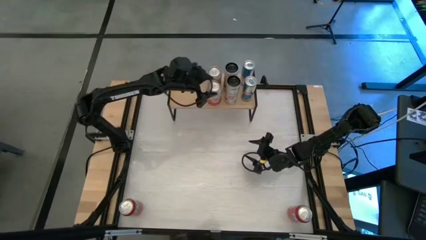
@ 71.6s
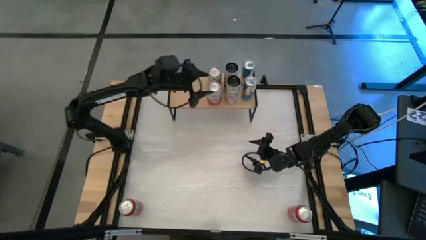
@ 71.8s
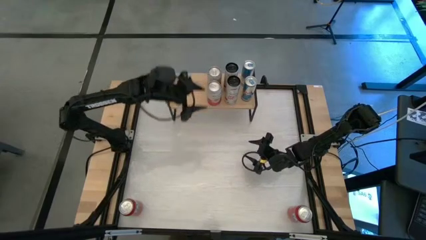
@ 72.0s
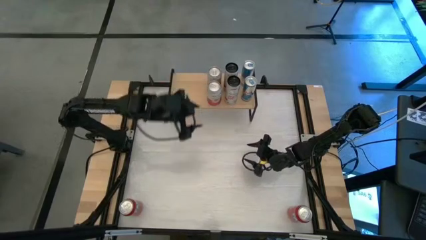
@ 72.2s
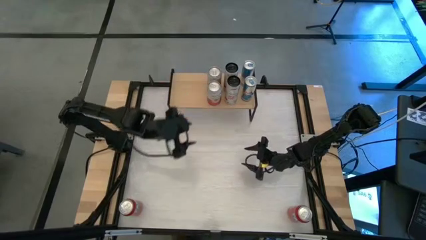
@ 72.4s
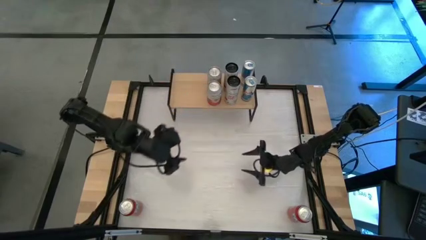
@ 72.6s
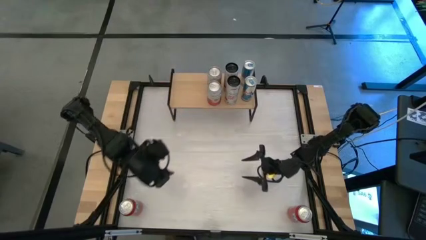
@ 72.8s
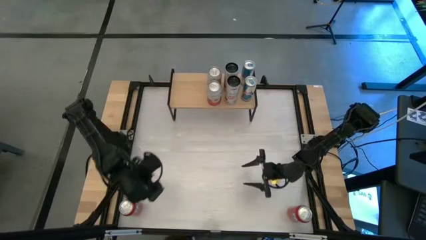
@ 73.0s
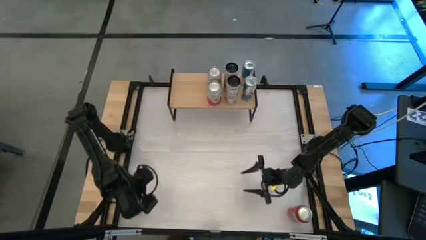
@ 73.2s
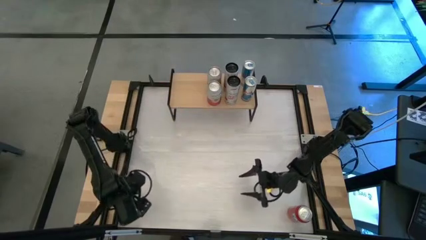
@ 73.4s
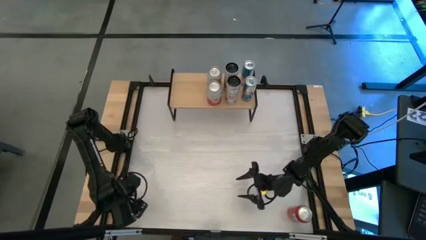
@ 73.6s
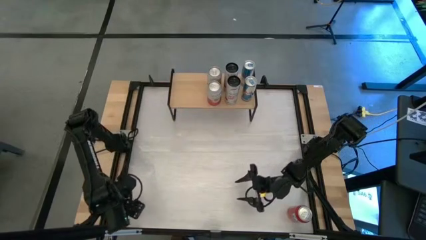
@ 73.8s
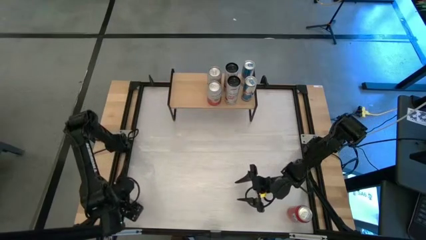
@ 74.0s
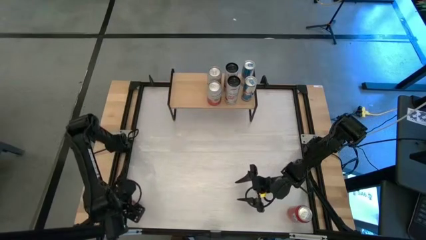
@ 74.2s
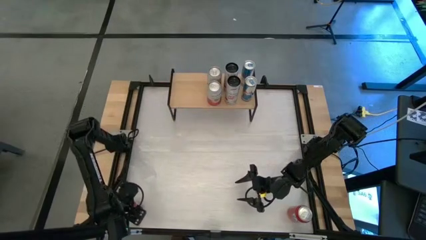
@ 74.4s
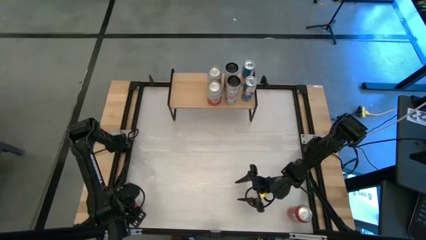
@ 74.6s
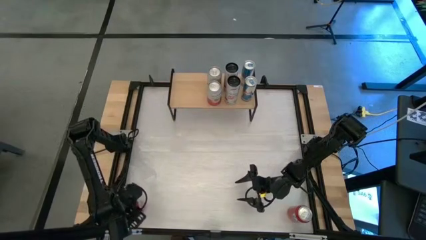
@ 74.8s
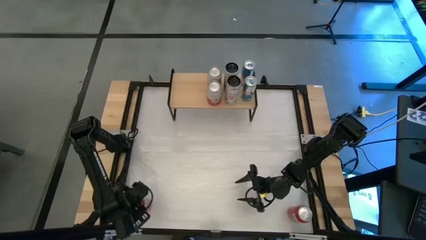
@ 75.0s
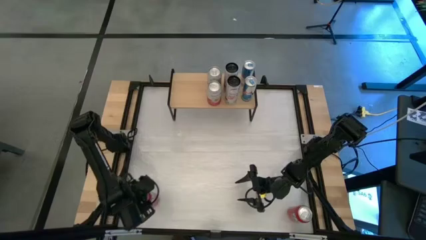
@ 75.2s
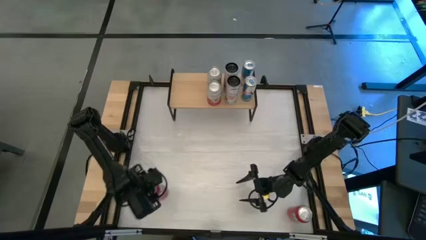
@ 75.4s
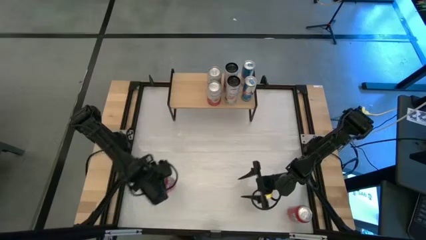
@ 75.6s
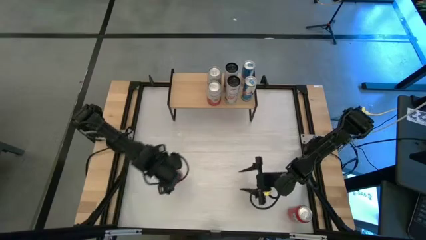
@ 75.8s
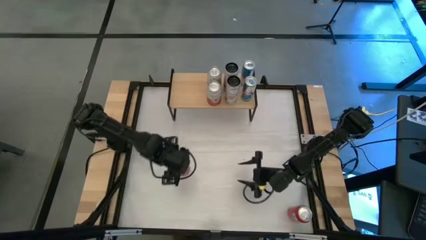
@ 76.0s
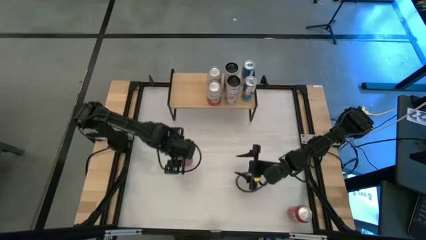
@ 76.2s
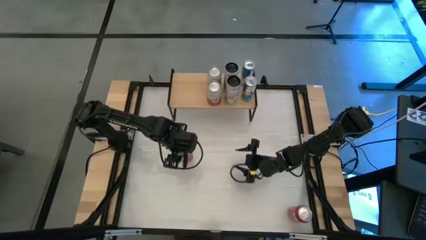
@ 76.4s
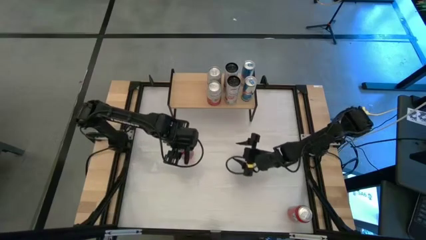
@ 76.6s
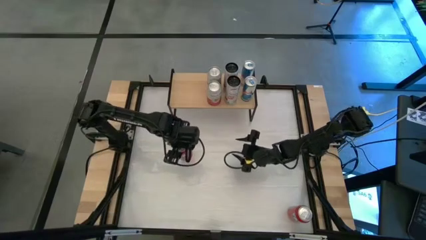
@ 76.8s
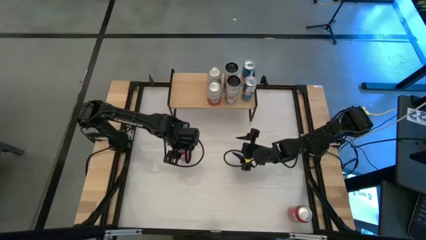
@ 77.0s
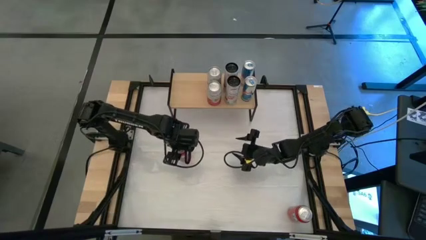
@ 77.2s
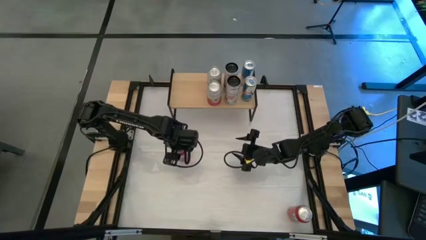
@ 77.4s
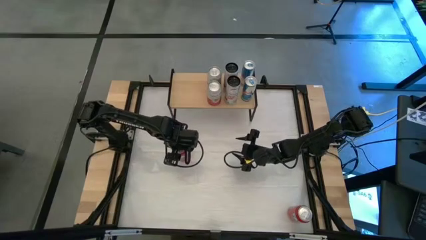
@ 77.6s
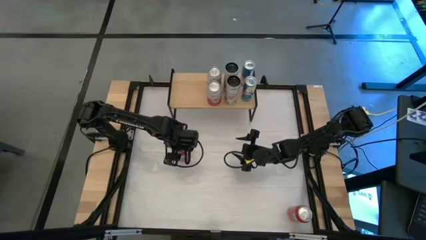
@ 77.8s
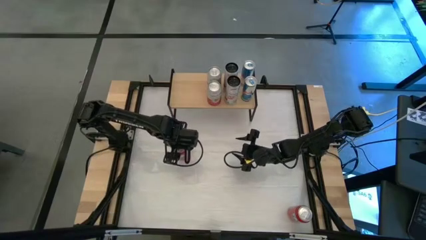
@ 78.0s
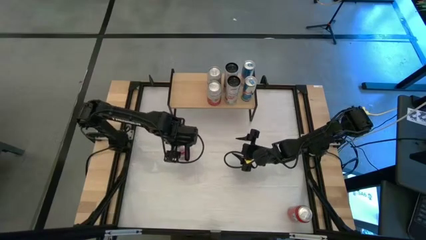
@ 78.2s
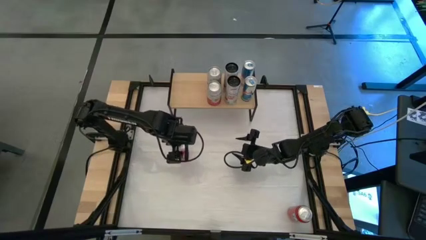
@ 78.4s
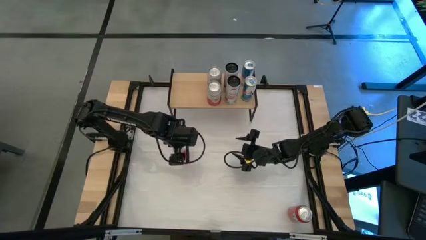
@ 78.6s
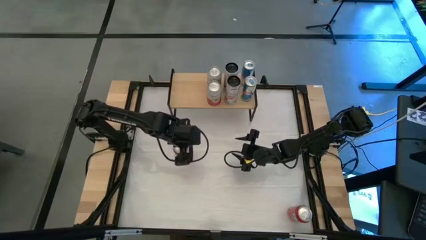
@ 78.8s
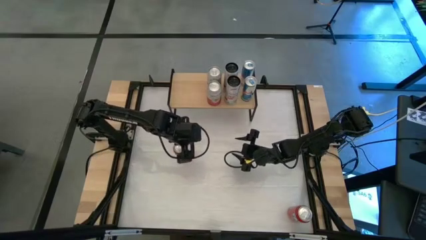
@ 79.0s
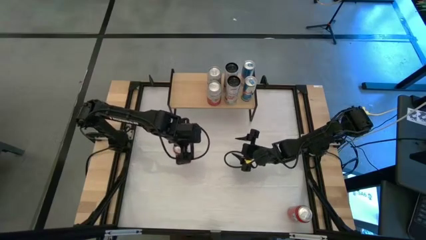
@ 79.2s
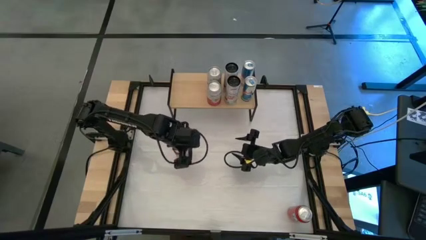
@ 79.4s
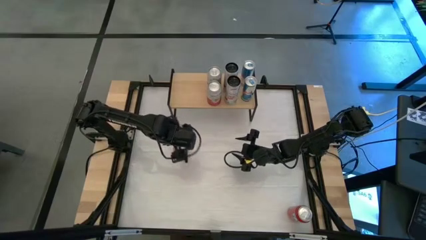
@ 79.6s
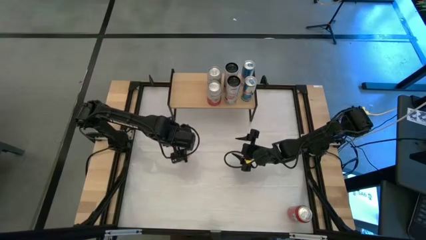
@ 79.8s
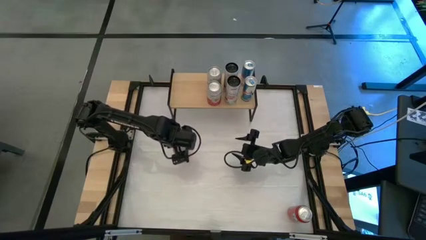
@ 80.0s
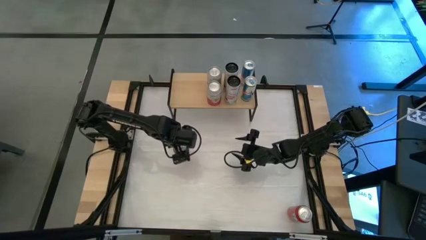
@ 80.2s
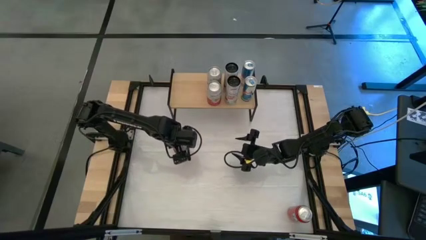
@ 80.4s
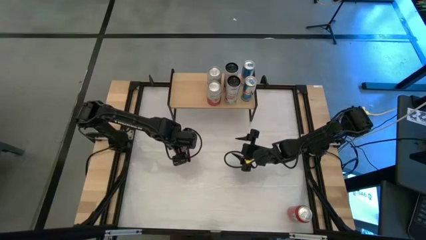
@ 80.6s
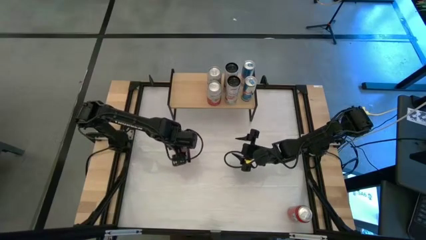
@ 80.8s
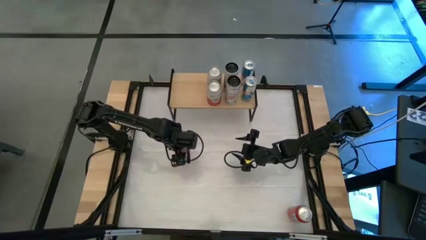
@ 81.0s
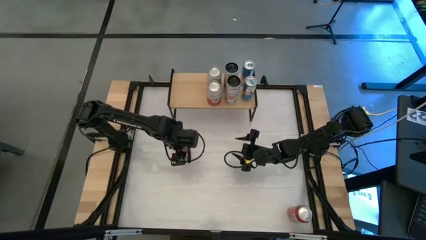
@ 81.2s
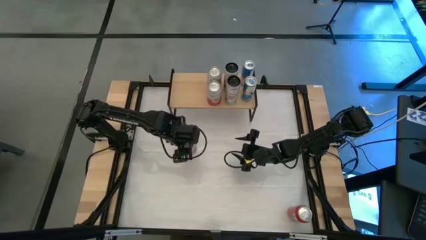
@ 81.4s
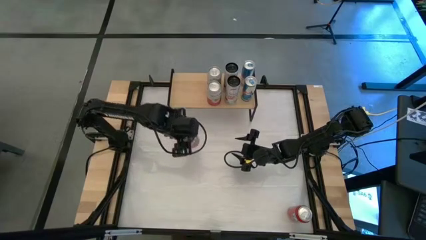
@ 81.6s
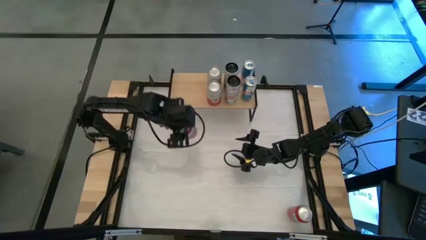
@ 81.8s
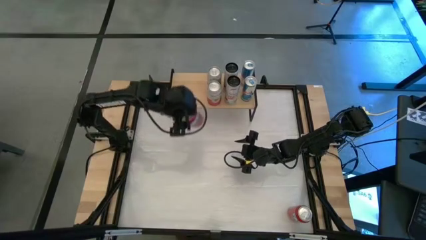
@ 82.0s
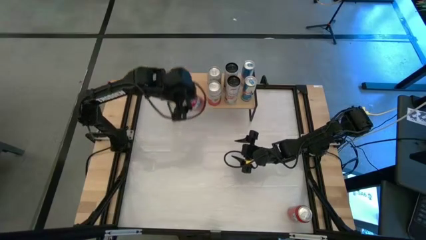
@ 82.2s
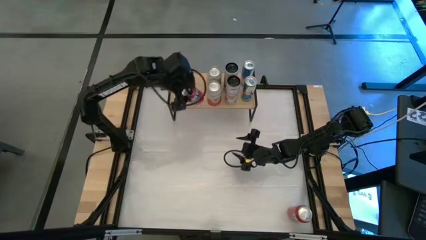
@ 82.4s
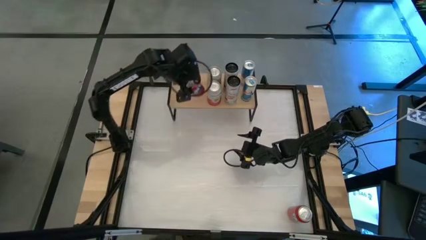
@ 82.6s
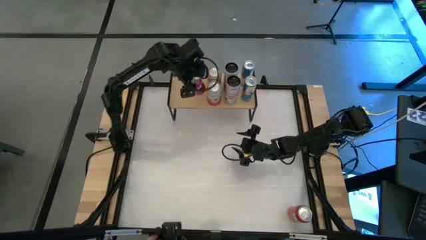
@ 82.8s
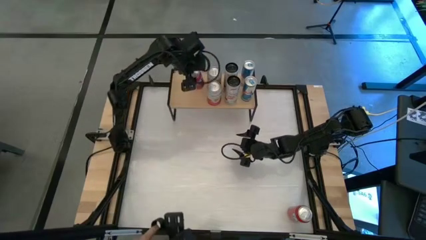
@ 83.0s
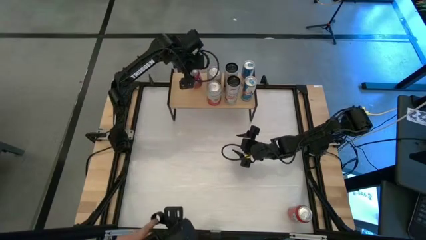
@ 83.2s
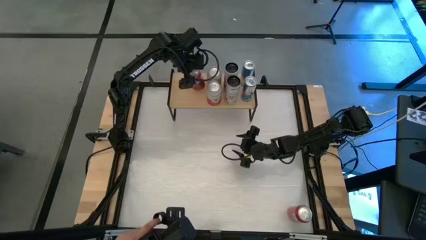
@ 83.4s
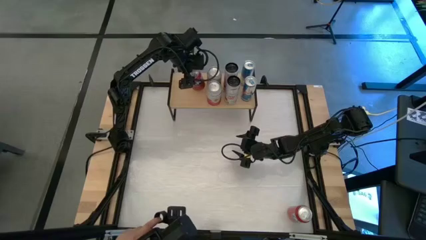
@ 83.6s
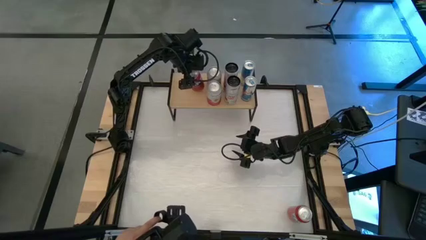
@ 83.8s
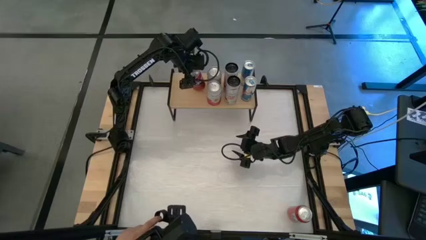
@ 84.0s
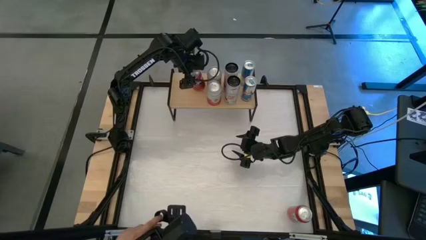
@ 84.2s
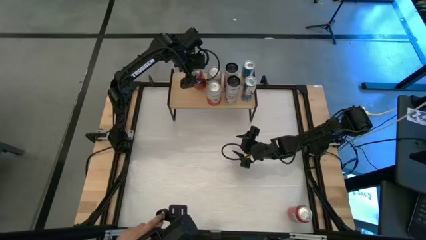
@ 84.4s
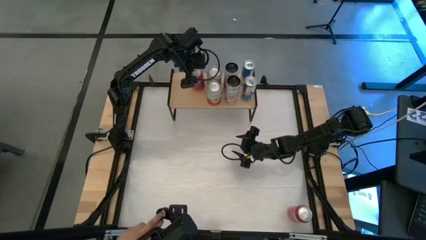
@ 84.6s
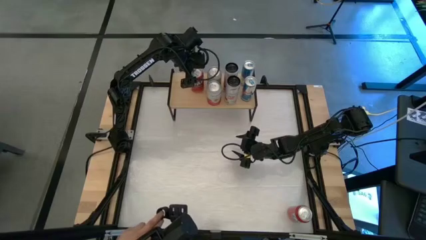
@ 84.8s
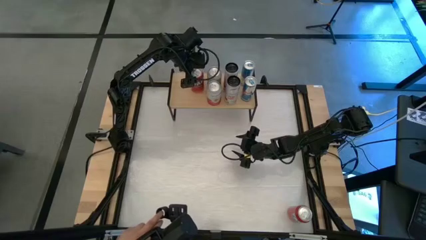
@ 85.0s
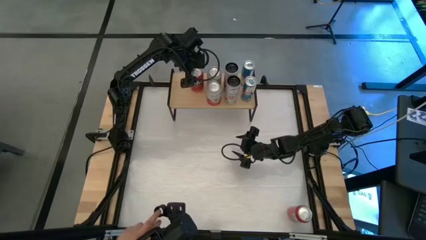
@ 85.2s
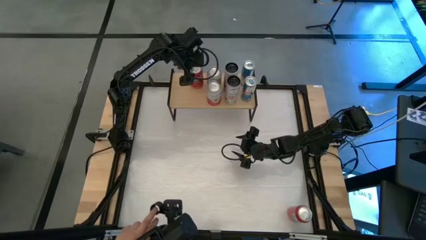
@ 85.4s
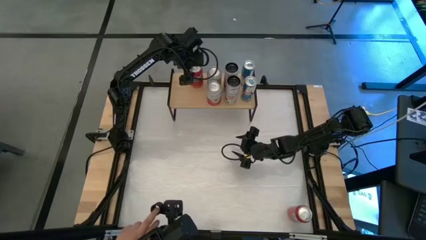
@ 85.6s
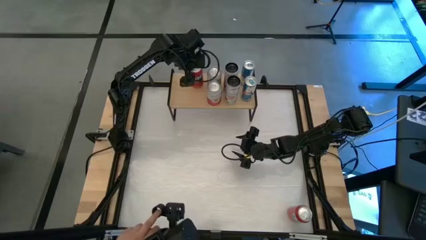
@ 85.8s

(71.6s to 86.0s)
Task: Place canned beverage on shelf
Put the left red soda can on the shelf
